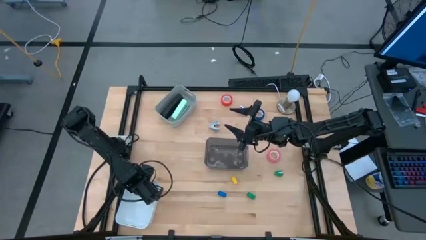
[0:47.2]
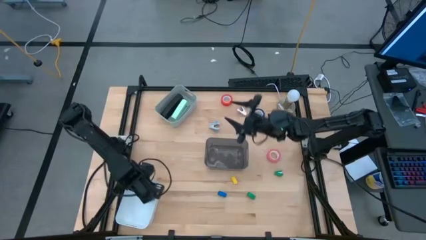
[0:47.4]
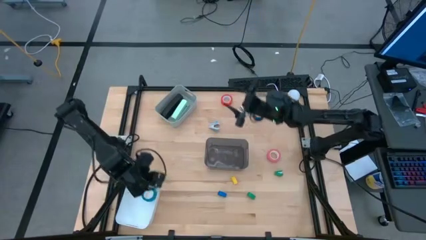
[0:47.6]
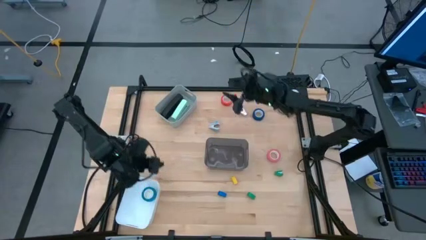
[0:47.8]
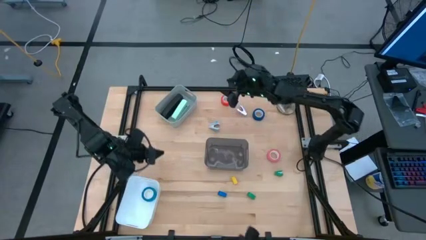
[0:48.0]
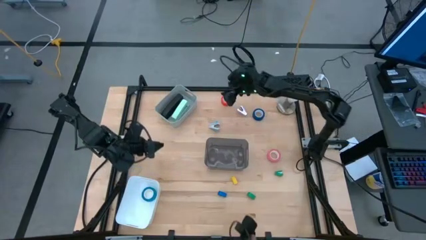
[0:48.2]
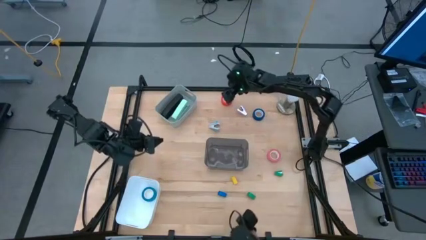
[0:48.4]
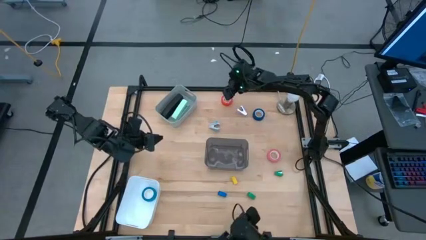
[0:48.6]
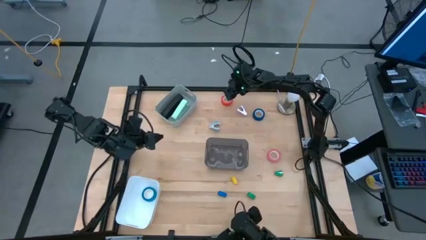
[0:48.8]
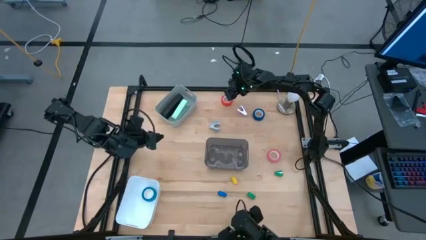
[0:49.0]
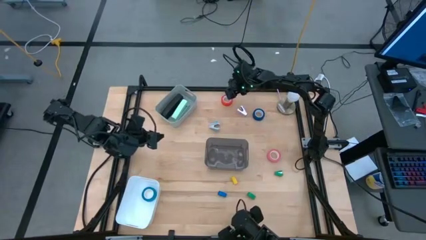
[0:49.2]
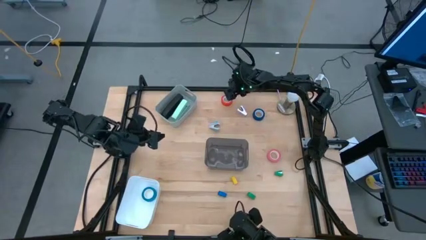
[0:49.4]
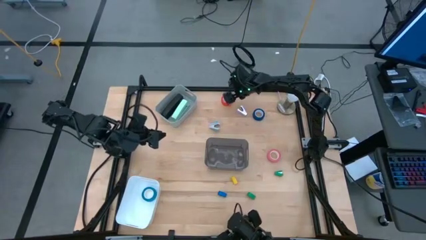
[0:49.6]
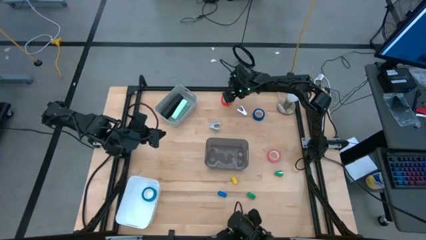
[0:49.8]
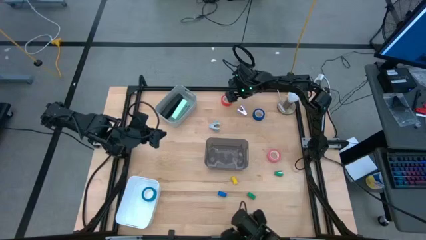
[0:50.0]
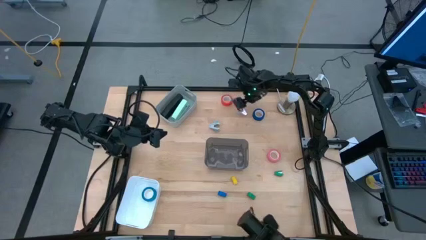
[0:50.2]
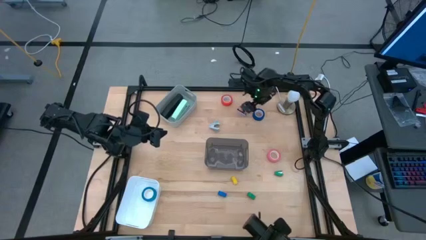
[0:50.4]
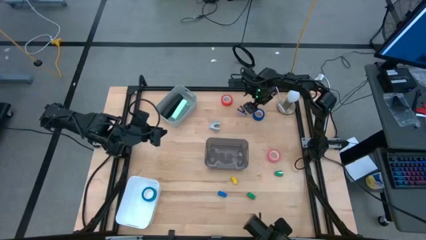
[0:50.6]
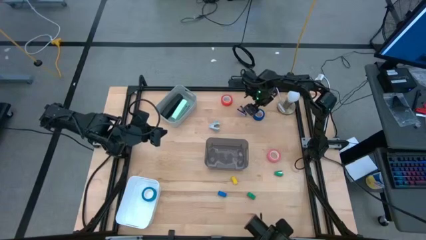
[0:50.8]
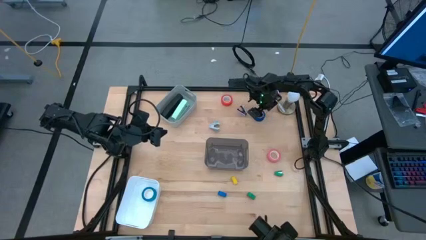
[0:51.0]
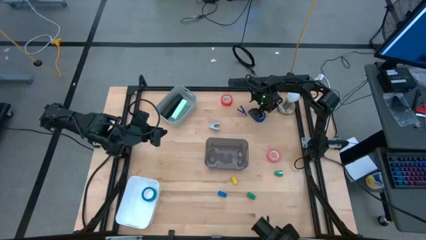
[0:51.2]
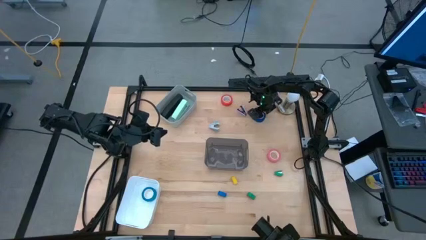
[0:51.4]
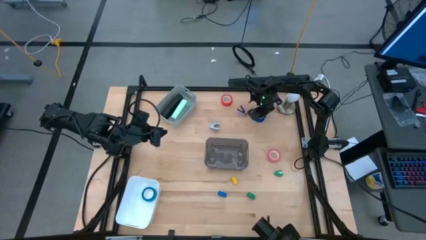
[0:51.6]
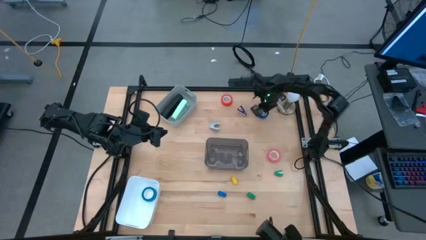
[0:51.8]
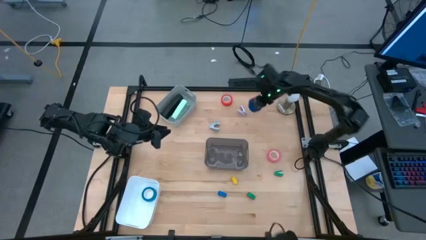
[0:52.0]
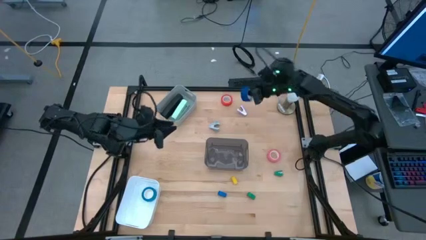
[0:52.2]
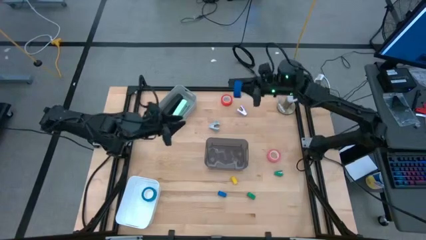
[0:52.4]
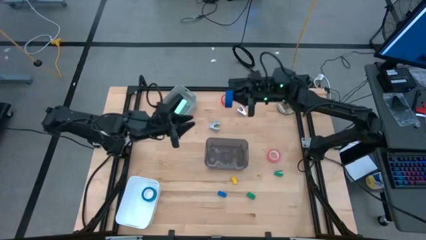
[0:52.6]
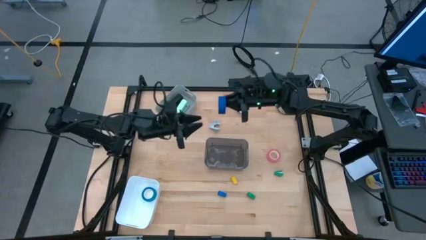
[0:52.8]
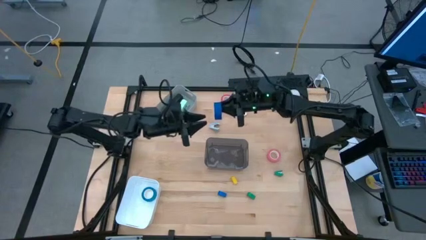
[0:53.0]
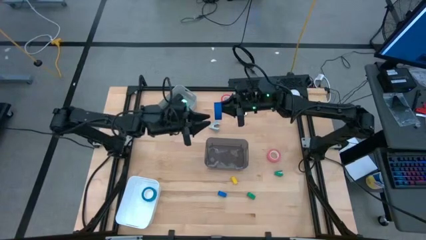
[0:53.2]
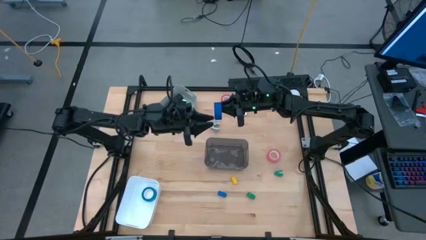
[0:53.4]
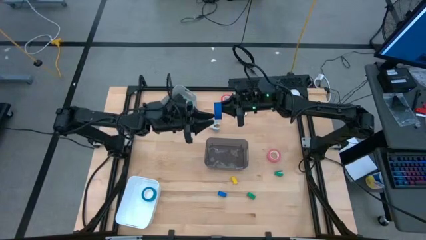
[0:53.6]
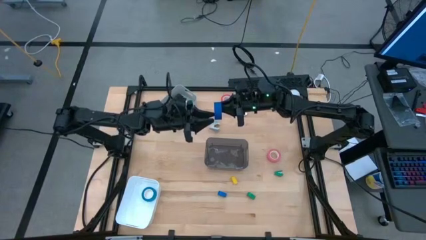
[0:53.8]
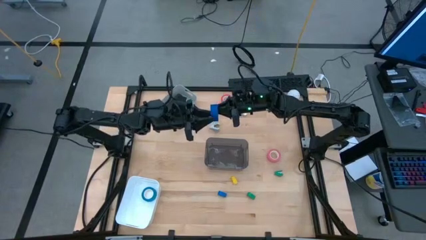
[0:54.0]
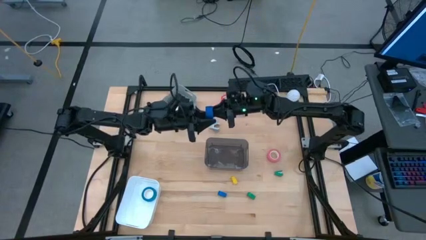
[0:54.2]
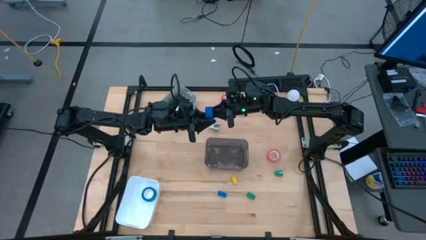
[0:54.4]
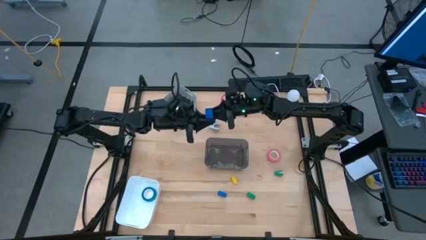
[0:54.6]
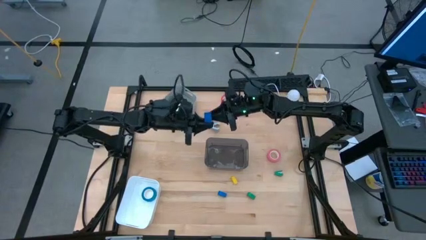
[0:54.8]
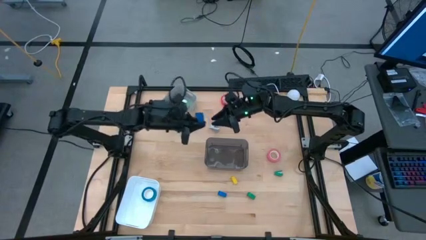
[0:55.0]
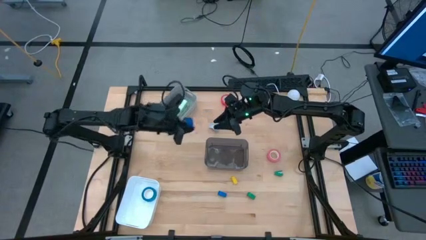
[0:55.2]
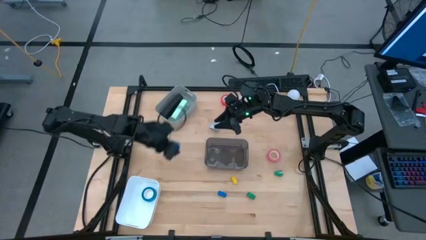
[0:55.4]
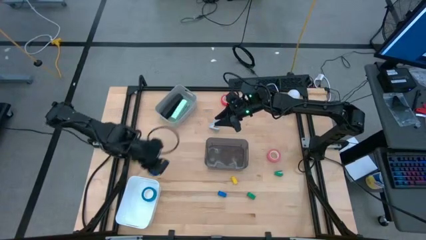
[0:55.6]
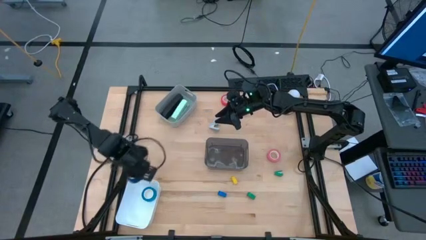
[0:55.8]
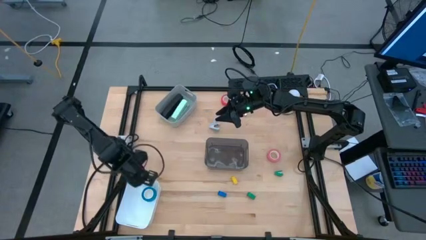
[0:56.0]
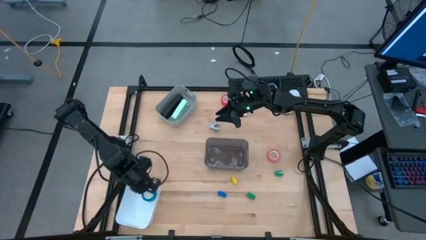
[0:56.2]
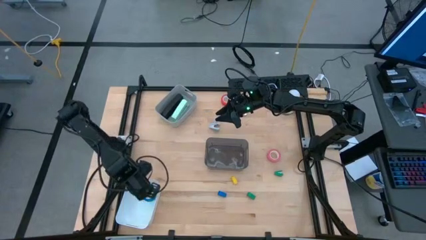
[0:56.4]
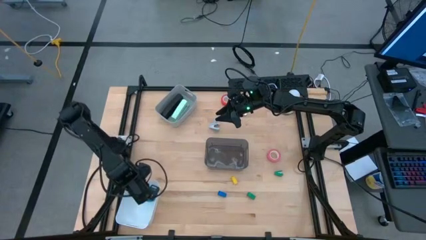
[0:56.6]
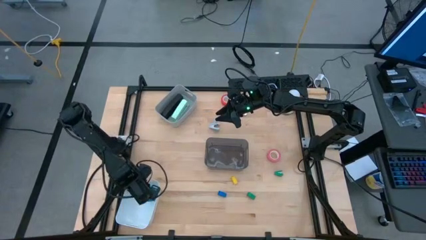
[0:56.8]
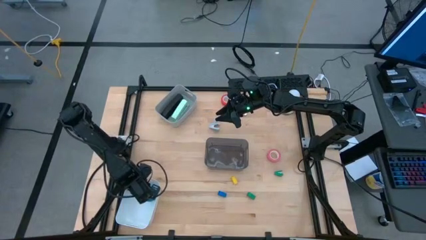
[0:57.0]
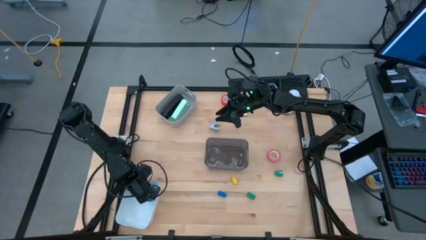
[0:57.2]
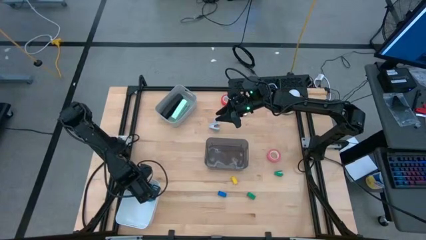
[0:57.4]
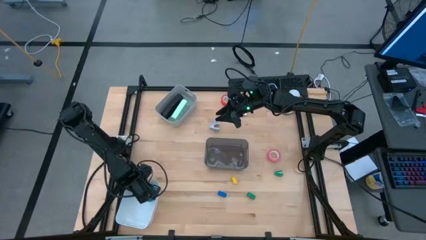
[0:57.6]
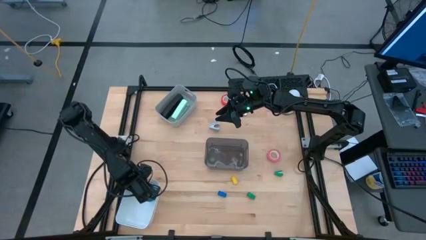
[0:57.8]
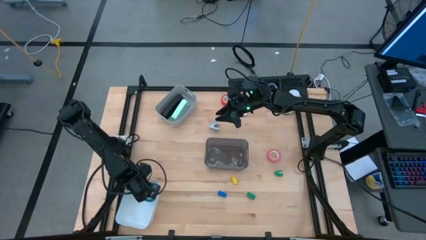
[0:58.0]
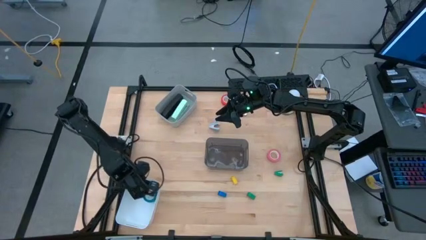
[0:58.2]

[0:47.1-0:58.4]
Task: Pick and place Stapler, Stapler remover, tape
Put the blue tape into the white bin

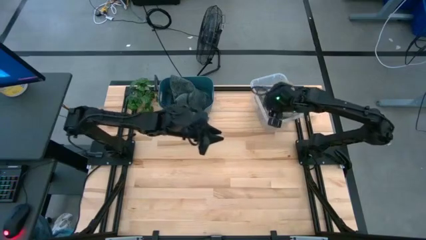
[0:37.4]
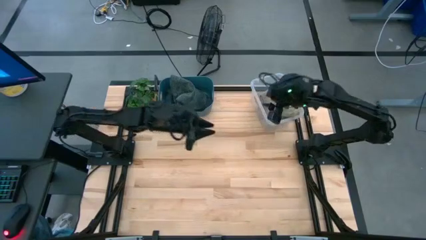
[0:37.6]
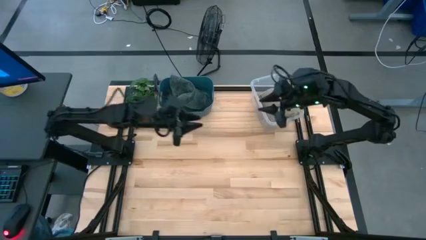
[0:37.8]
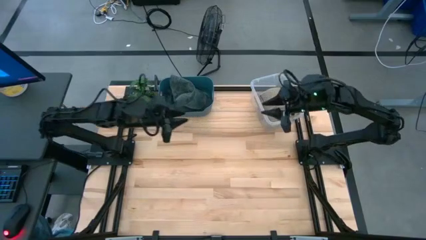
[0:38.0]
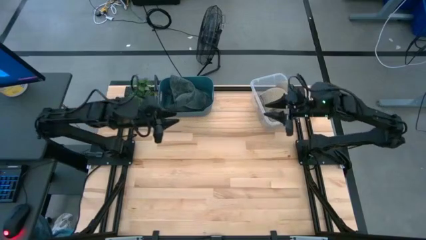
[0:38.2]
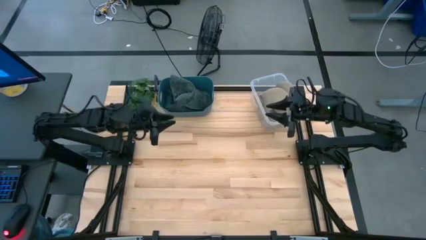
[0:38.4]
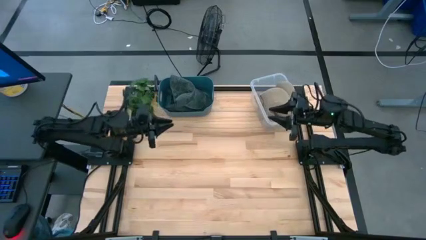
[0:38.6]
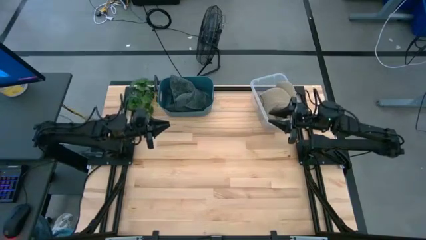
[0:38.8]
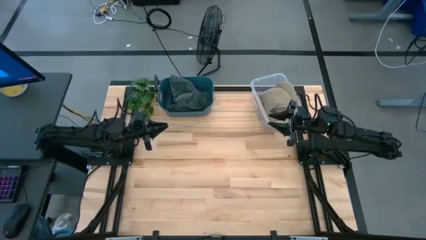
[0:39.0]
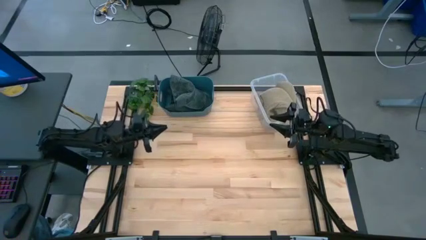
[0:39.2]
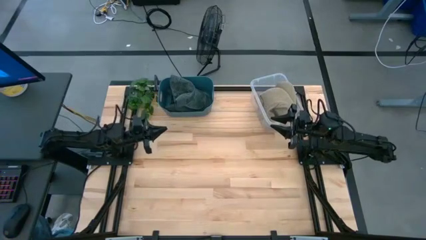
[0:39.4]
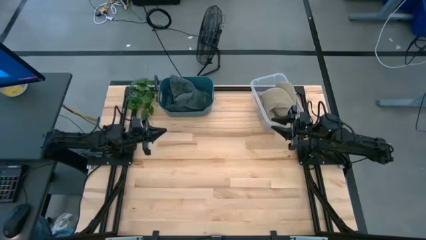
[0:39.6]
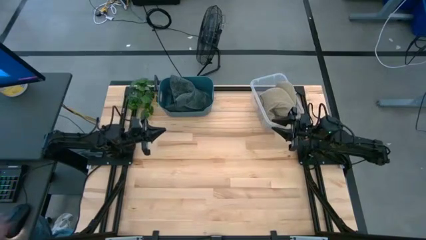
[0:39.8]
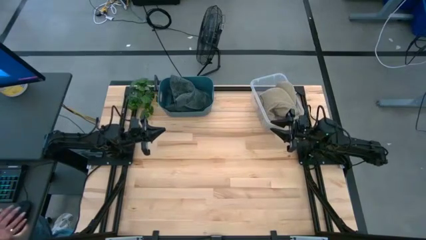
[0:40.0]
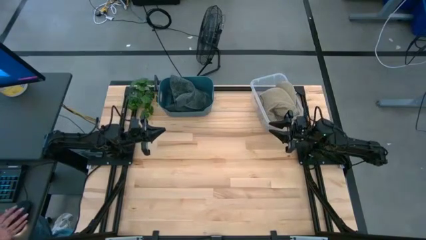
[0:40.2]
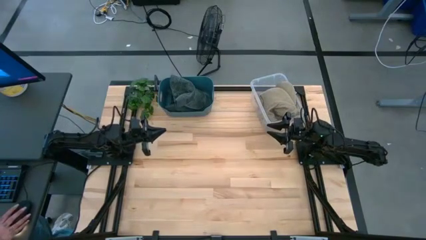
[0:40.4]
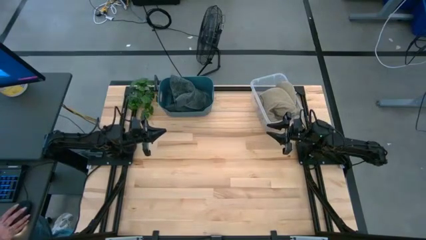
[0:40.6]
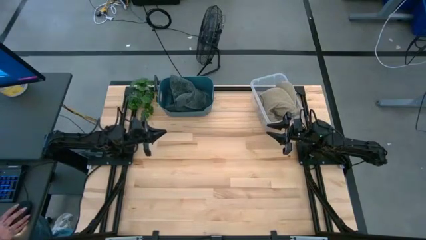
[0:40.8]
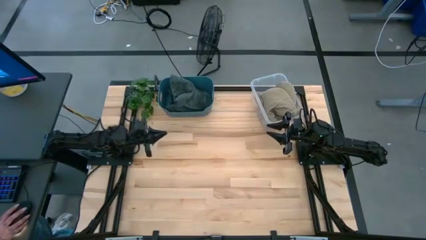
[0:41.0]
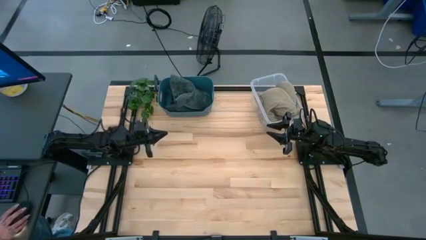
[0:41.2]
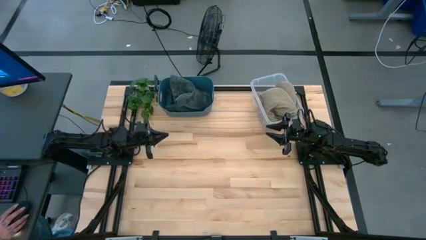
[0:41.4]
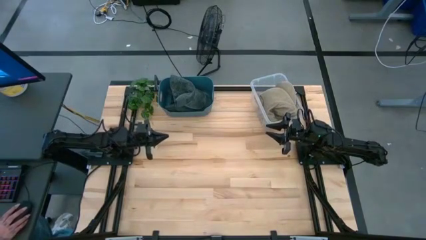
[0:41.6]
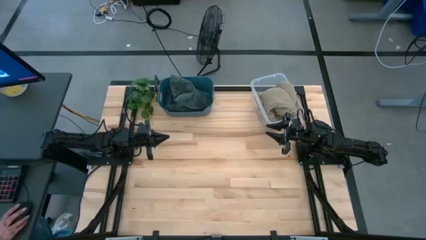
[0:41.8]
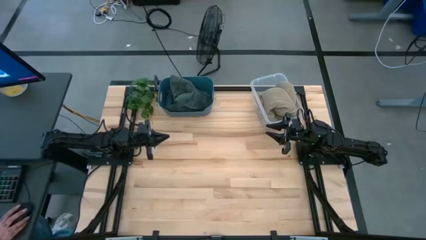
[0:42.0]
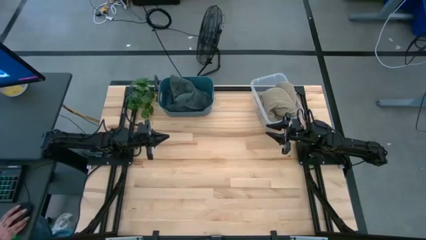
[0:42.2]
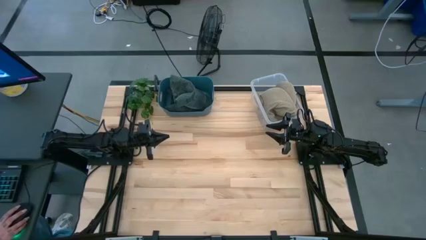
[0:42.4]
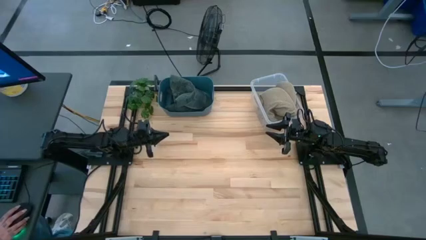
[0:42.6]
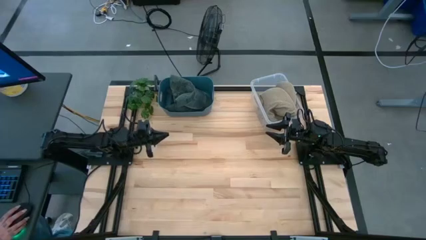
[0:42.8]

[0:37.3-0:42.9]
Task: Pick & Place hat
Return to Home Position
